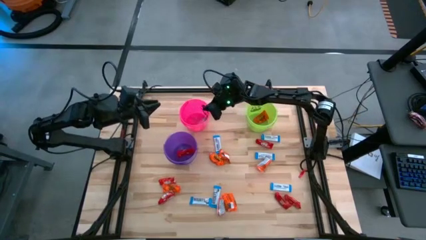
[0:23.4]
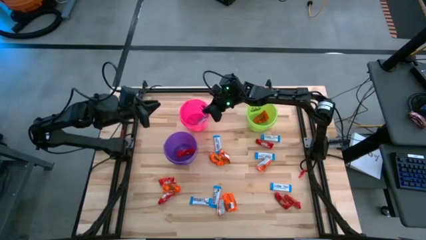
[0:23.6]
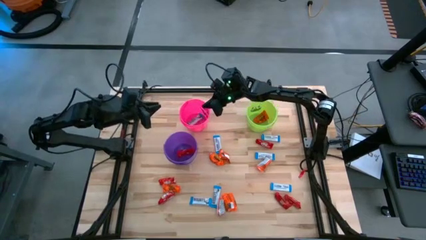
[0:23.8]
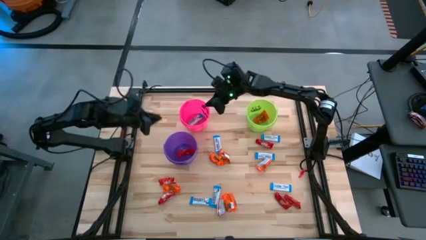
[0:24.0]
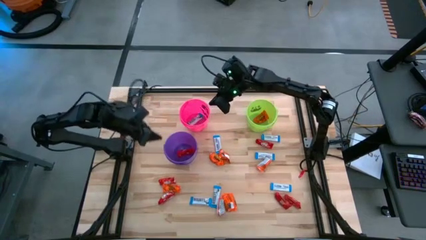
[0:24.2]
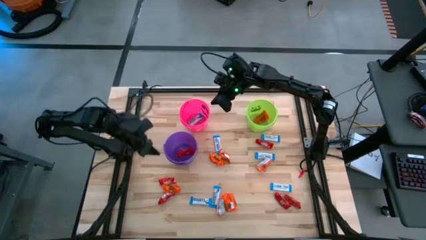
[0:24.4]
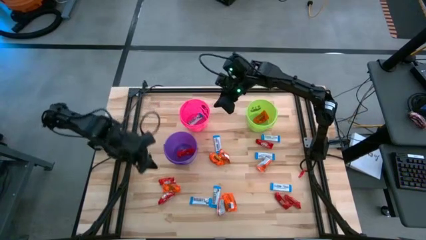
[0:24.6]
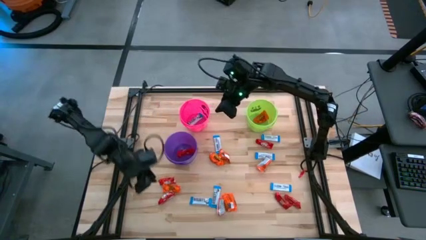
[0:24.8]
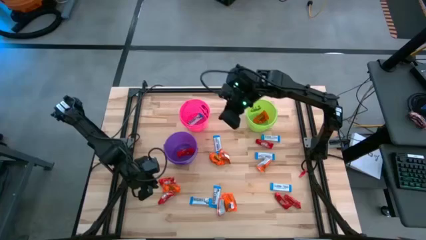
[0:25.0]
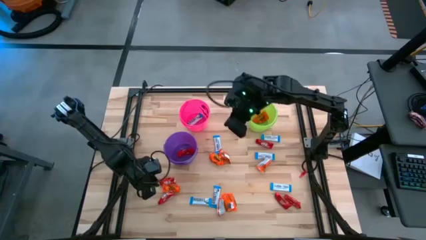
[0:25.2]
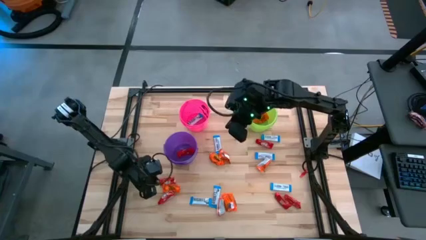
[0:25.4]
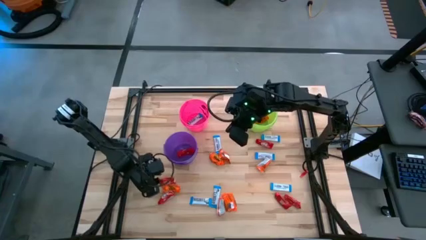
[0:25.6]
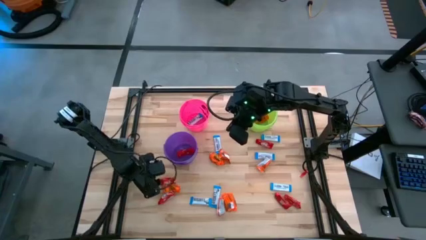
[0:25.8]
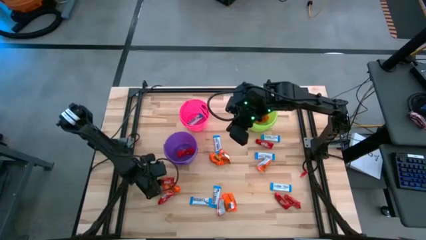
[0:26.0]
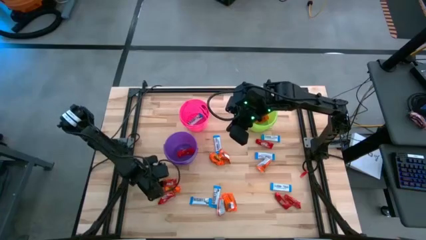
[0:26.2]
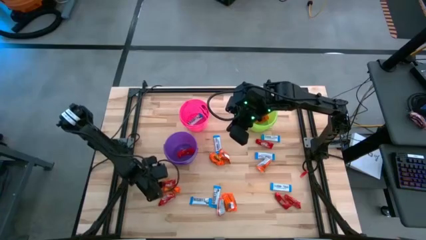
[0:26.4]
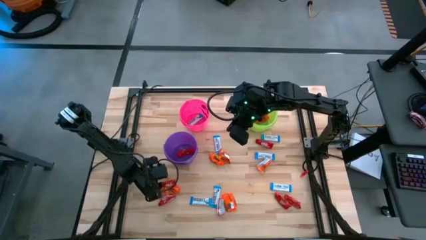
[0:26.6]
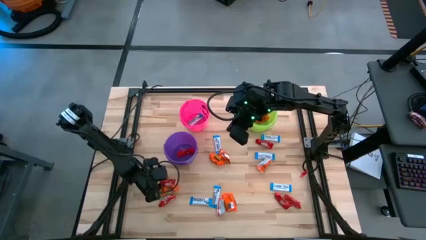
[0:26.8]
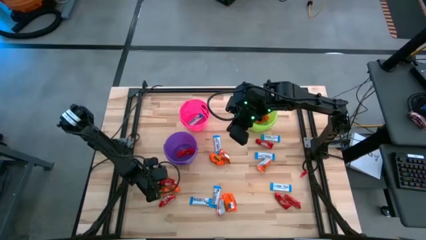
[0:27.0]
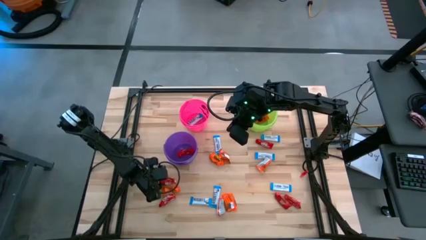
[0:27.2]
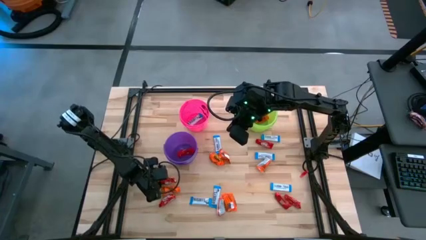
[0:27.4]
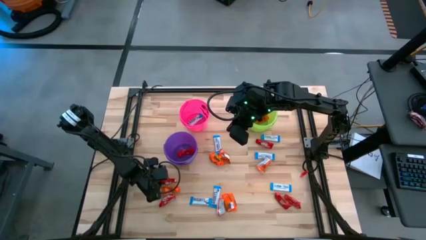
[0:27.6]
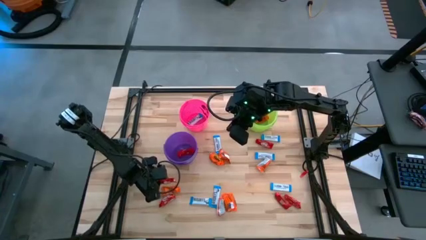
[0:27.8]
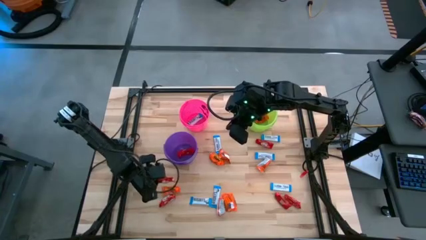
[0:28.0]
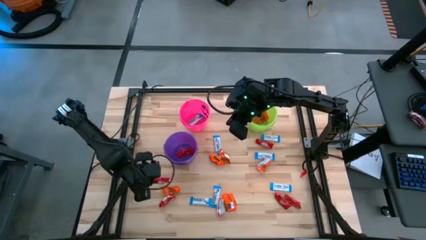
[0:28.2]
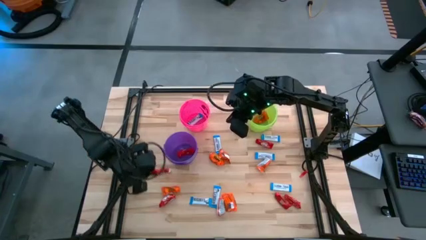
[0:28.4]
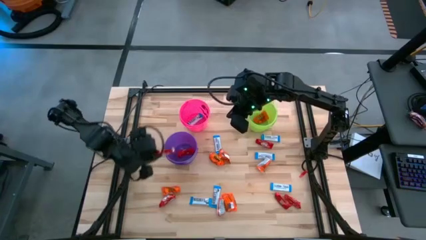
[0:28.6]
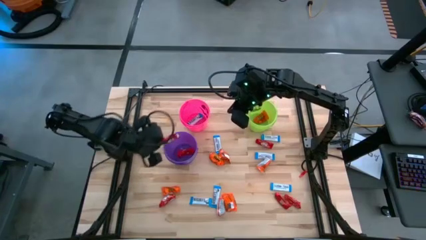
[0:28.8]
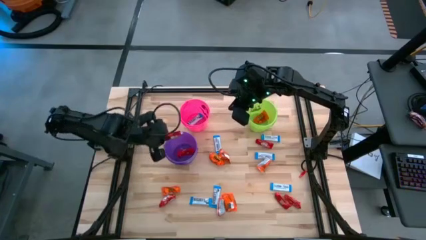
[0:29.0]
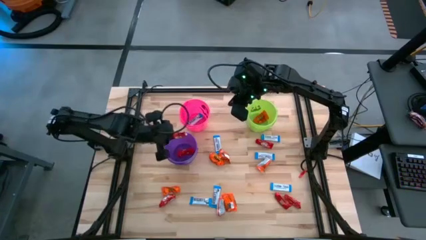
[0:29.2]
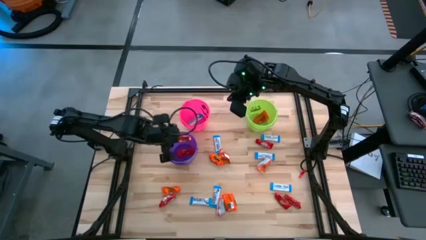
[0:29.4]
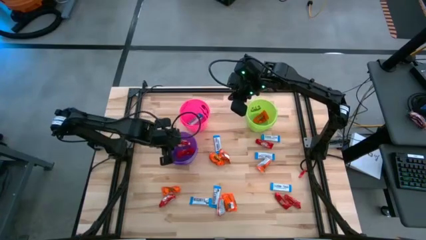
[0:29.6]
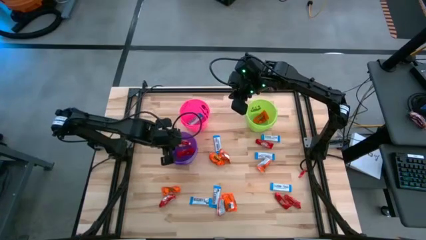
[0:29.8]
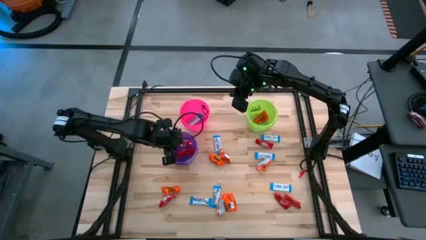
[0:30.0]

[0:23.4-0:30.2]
Task: Sort candy
Put the red chocolate into the purple bucket

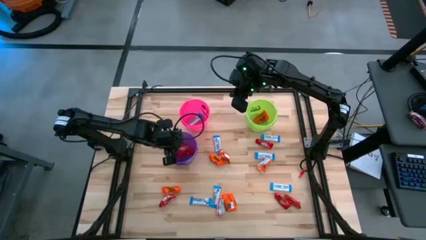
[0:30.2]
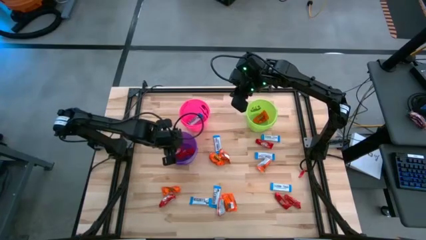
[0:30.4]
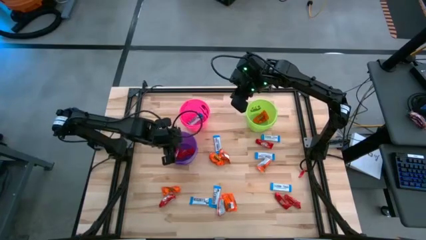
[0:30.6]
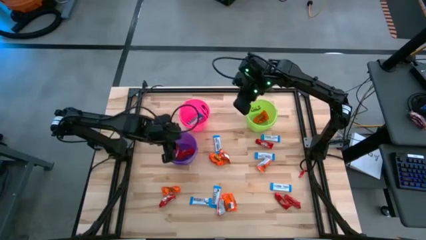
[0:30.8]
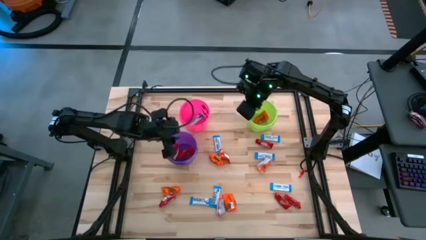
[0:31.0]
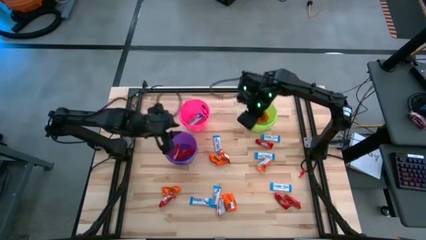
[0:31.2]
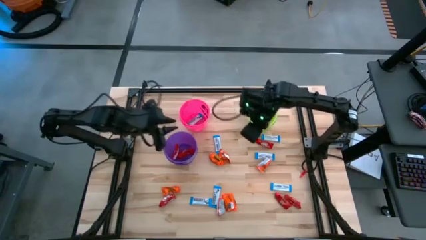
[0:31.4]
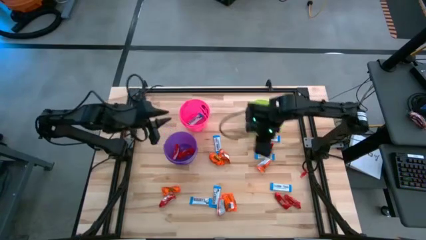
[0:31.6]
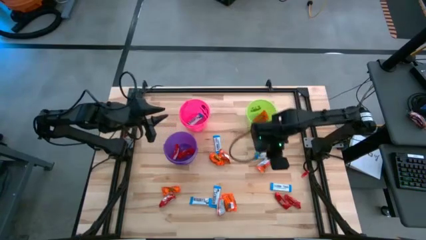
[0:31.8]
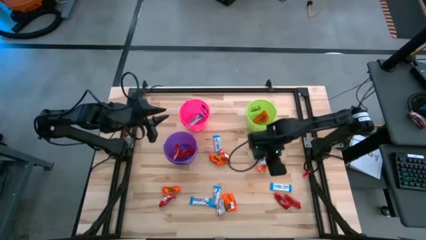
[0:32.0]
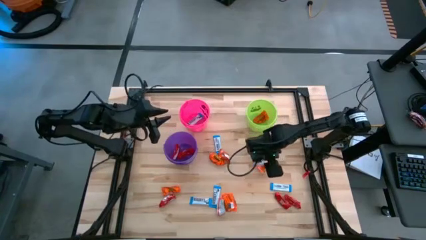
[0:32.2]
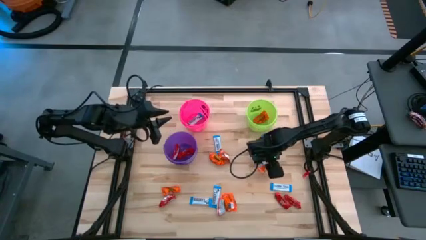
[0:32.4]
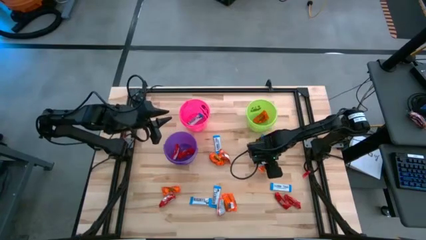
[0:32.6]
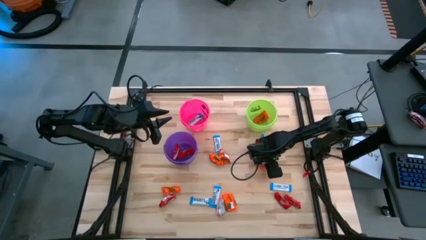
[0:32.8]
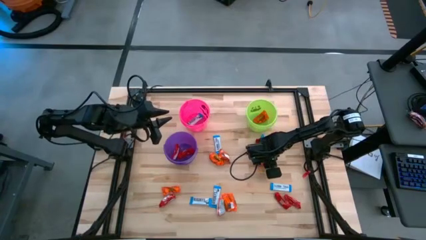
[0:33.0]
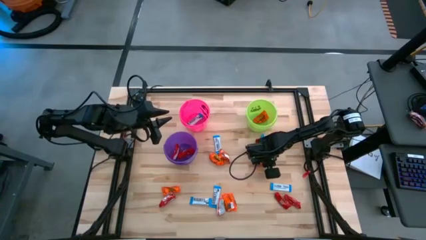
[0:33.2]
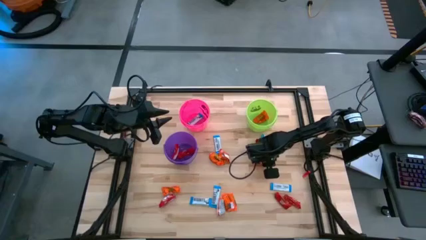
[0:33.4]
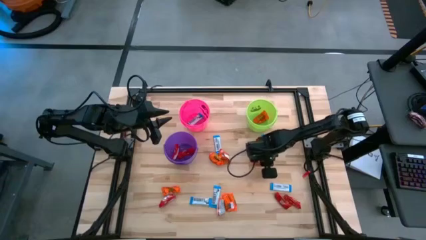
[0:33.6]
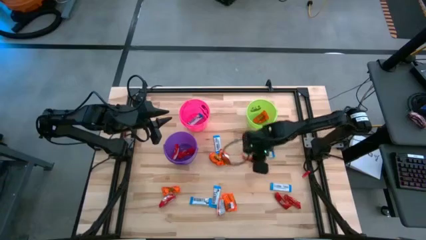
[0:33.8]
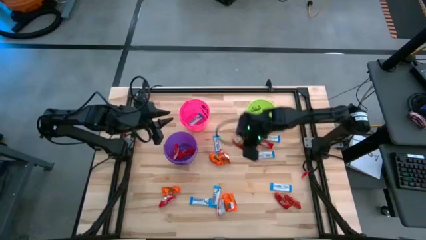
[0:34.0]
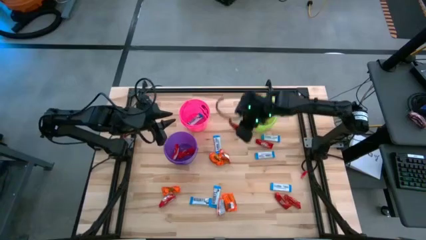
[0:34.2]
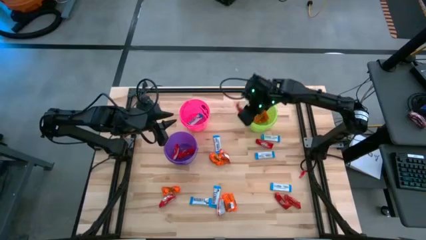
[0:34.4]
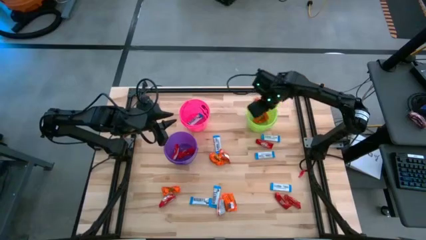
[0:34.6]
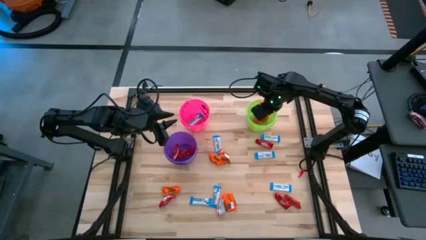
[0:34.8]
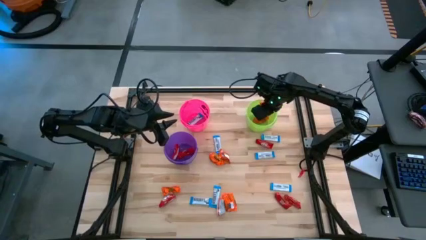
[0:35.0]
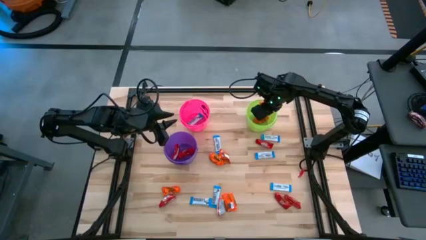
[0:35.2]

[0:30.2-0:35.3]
Put the orange chocolate into the green bucket

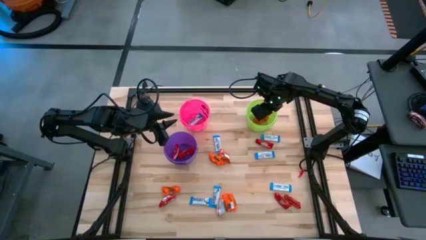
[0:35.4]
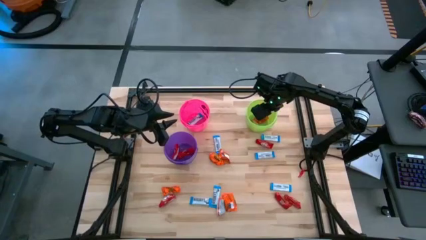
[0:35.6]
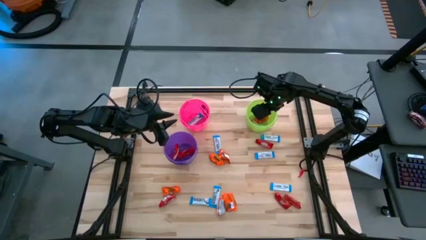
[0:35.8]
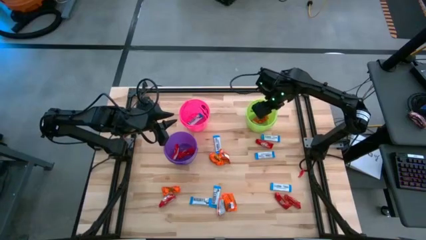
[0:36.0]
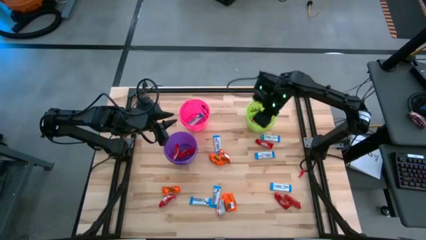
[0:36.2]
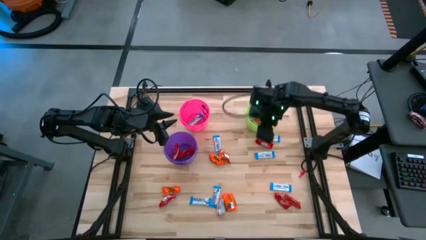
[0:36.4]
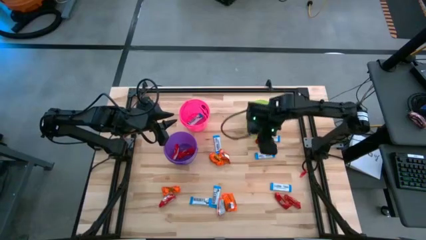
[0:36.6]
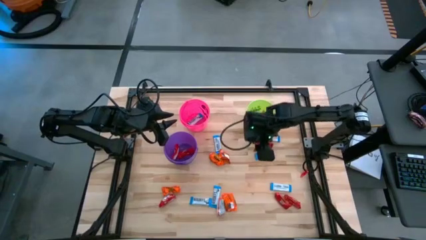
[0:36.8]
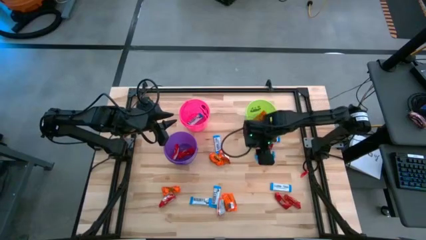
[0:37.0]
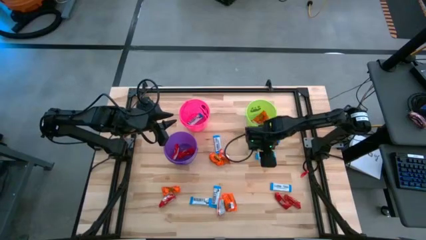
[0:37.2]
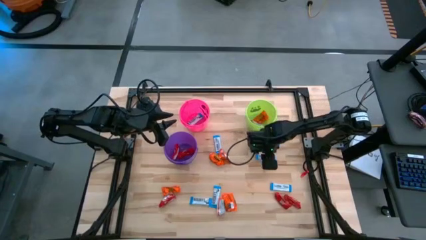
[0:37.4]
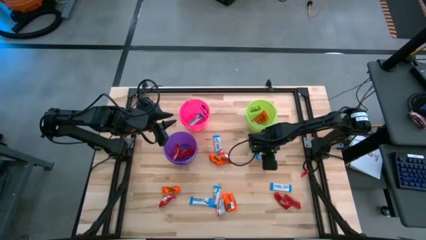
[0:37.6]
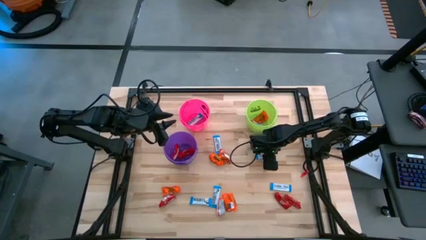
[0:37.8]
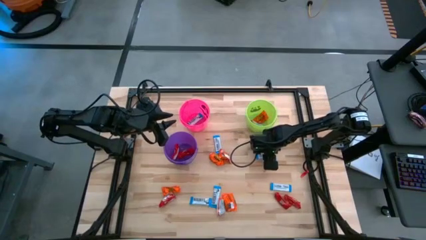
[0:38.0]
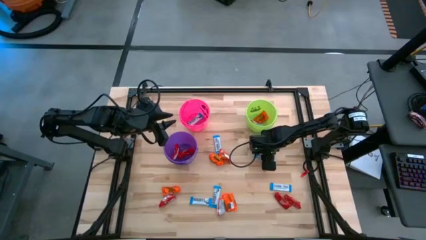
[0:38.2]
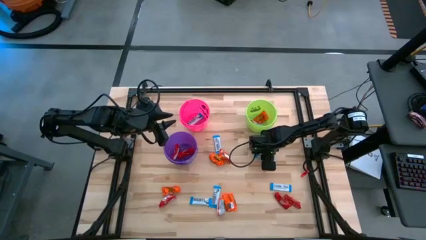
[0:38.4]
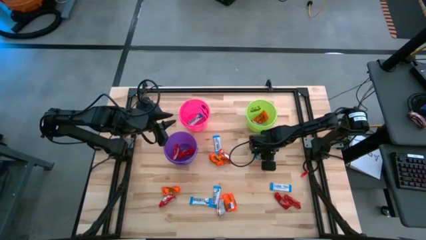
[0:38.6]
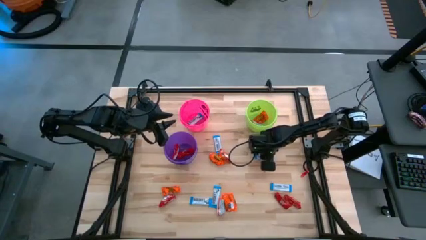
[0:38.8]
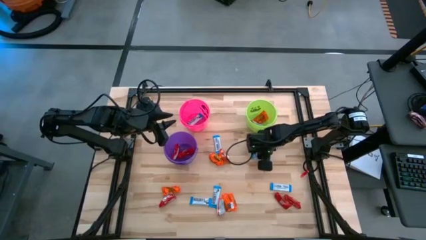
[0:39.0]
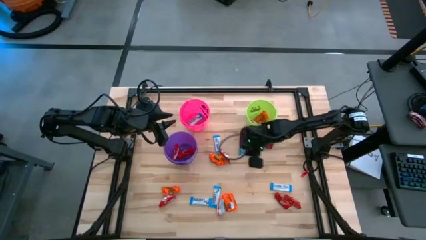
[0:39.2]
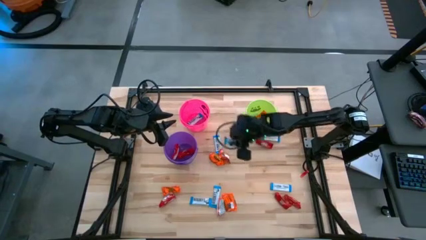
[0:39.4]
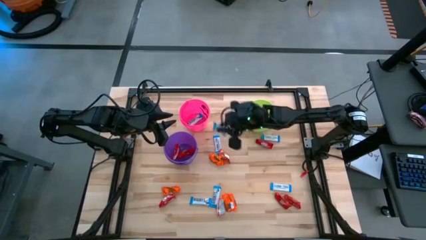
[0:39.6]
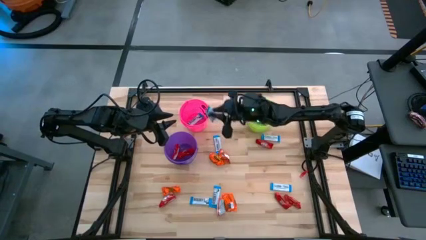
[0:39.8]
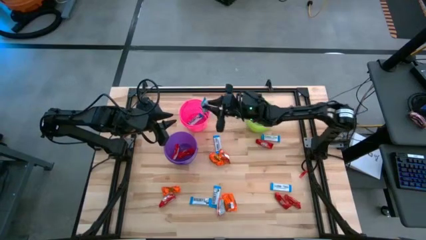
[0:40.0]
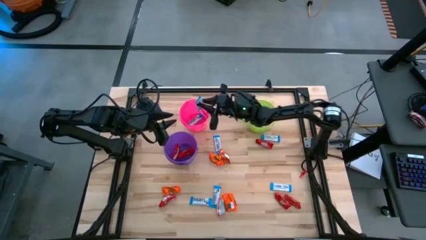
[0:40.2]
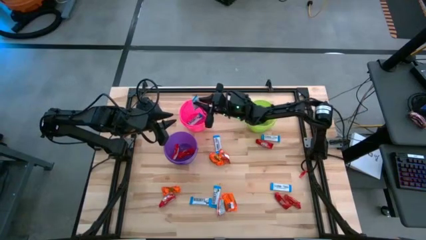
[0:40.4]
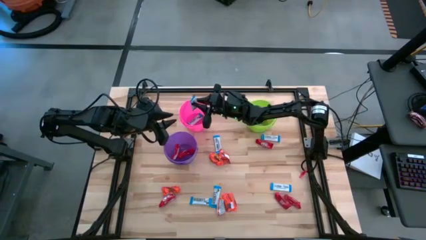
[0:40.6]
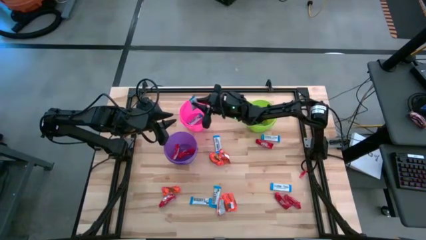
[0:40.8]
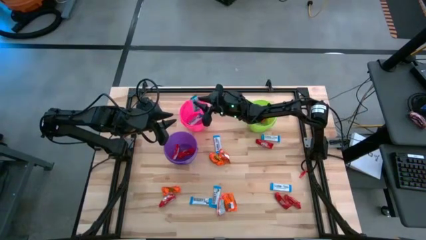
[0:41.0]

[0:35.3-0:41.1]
Put the white chocolate into the pink bucket
